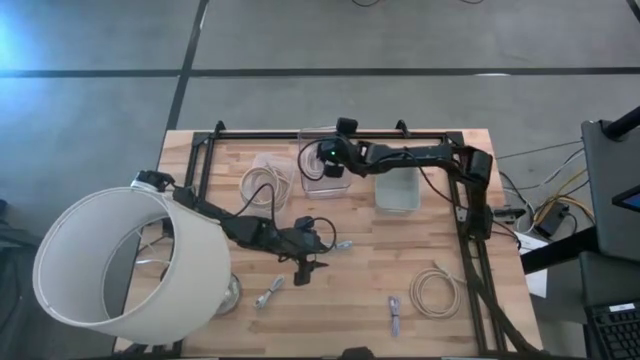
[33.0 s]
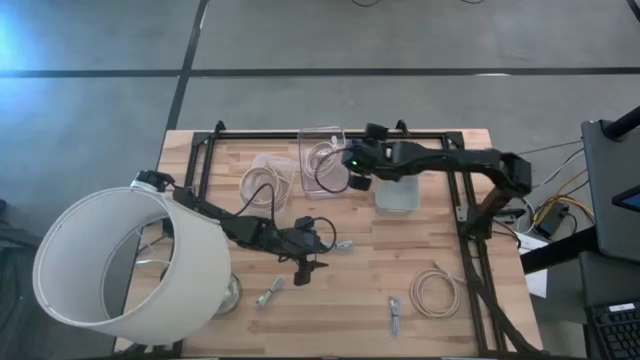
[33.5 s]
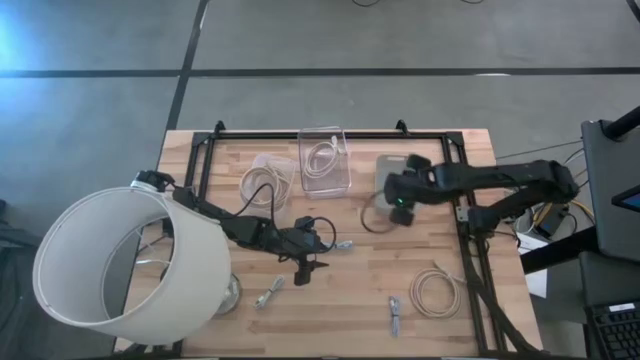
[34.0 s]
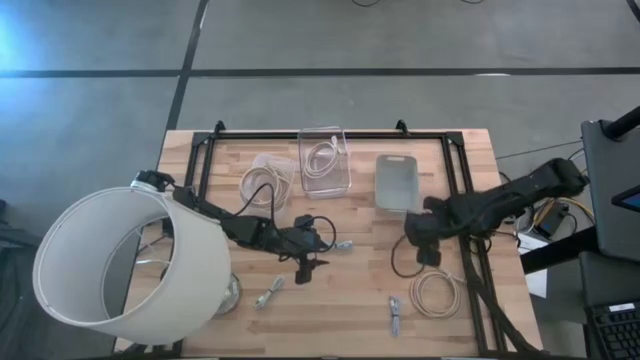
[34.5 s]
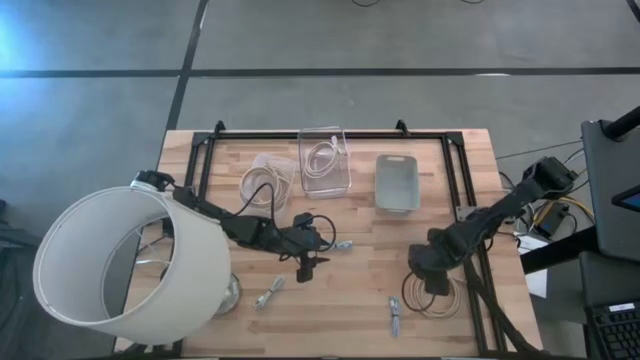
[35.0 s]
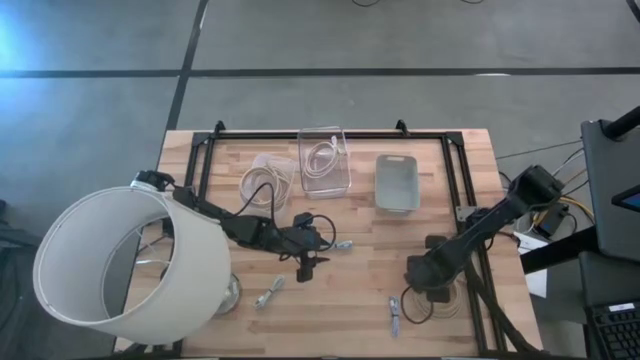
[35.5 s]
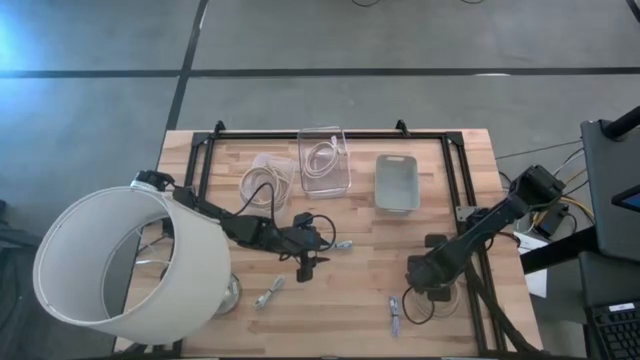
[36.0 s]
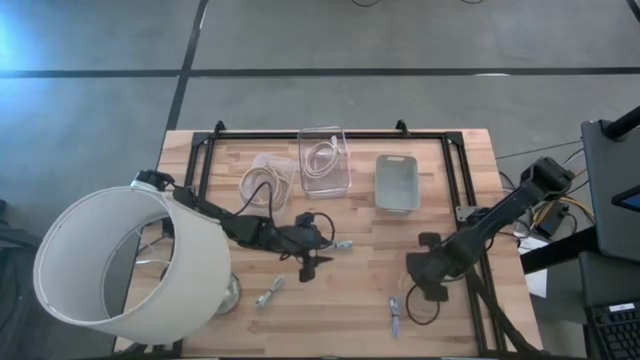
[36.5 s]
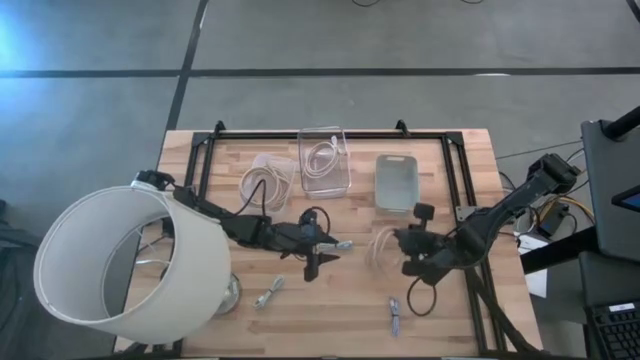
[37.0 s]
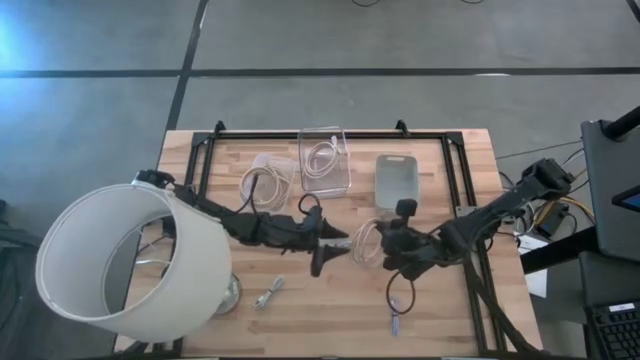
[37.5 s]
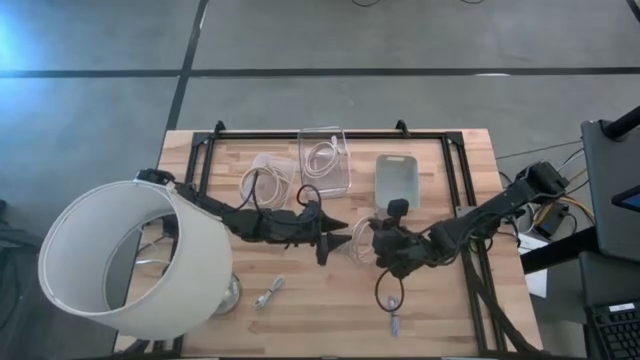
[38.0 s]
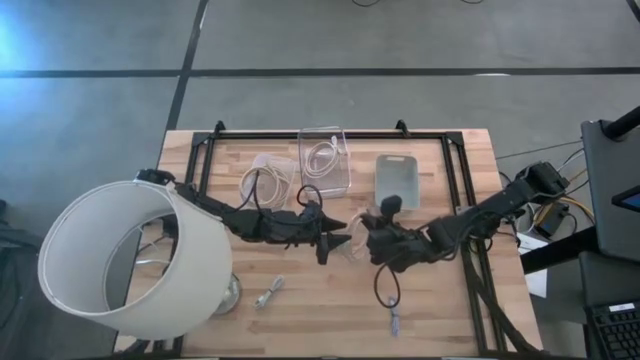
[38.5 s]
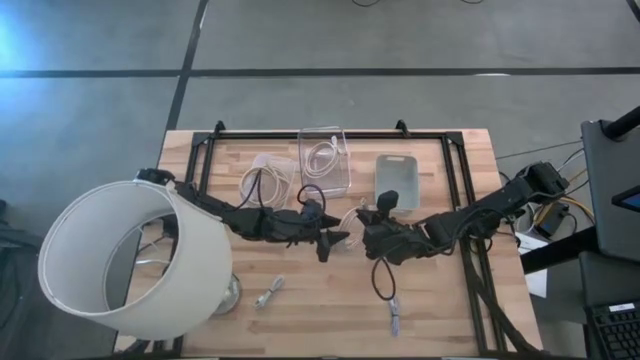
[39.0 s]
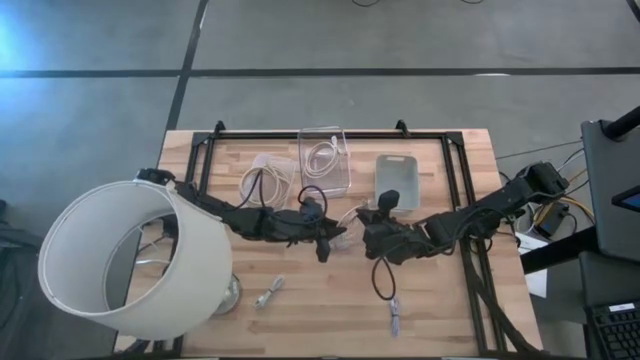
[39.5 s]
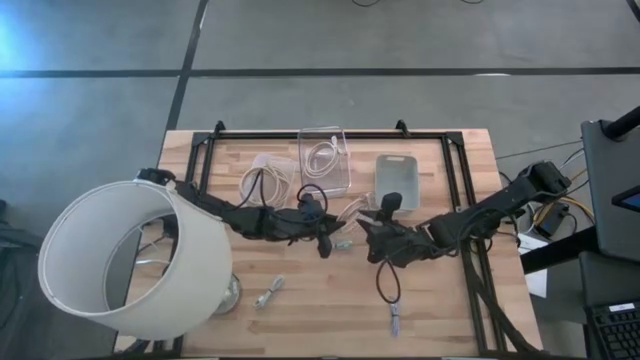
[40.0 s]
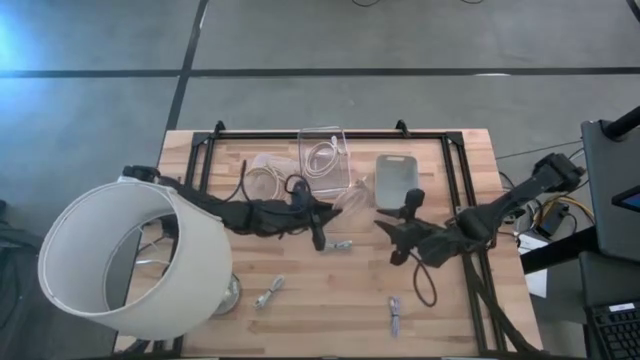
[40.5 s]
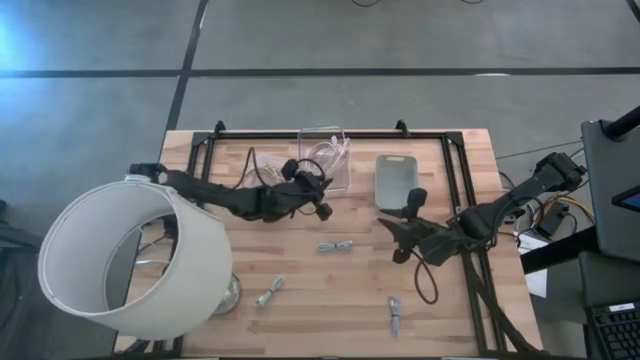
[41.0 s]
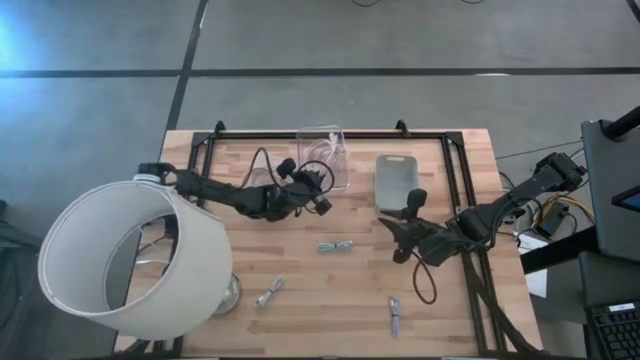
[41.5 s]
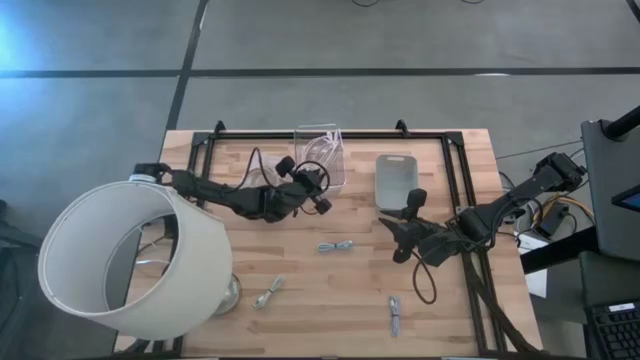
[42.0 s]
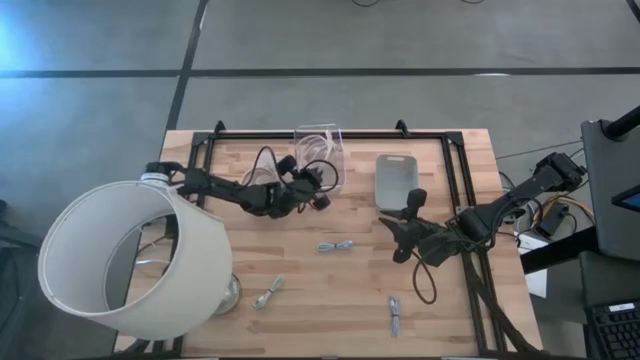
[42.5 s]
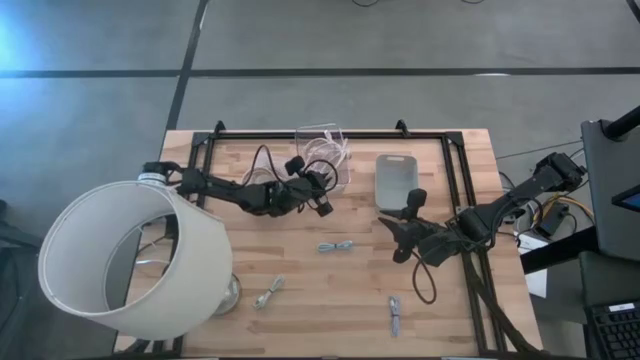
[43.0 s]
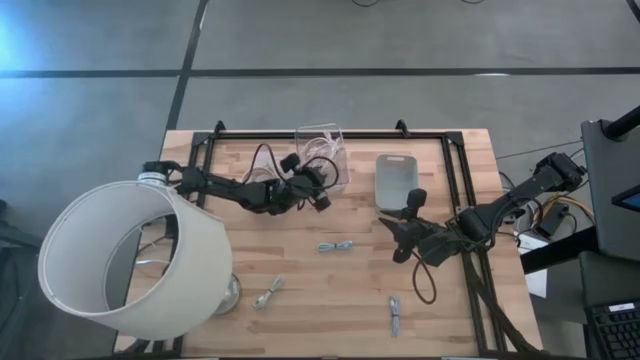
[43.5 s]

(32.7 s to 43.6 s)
Task: Pick & Place USB Port
Put the brown USB cable into the transparent bin

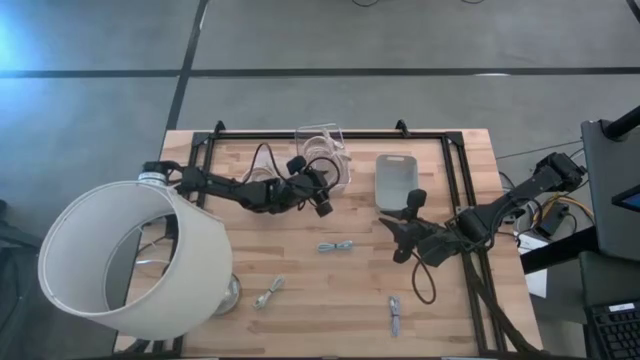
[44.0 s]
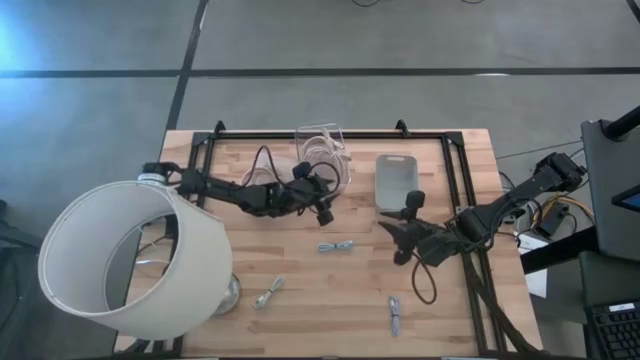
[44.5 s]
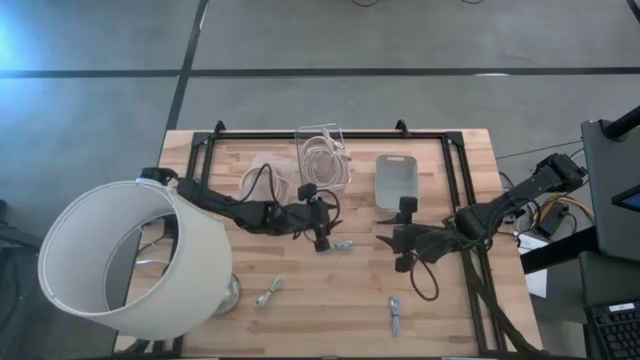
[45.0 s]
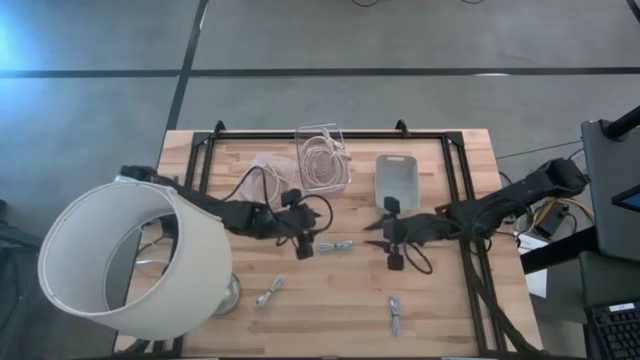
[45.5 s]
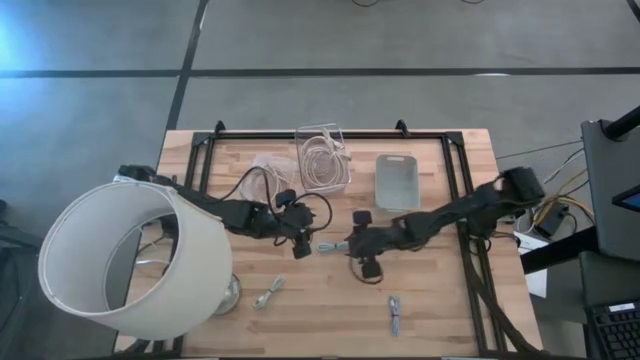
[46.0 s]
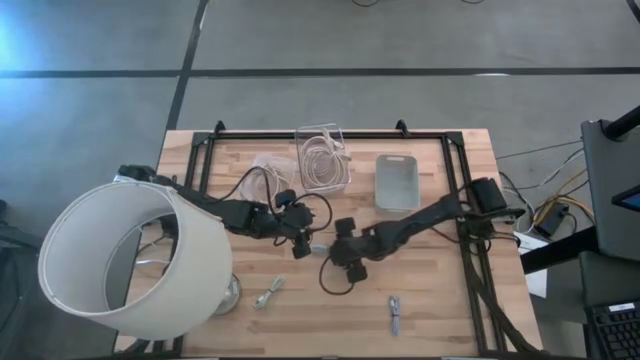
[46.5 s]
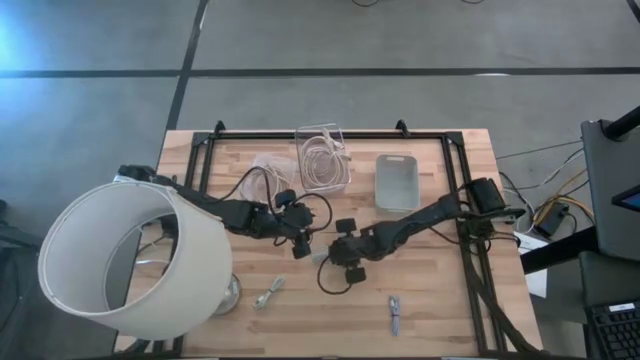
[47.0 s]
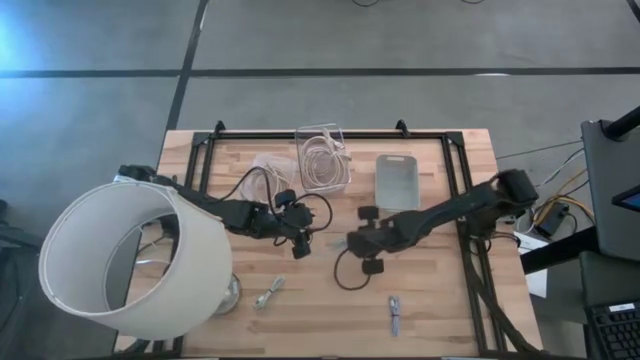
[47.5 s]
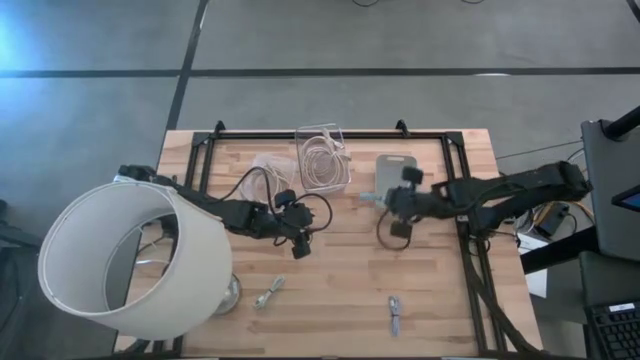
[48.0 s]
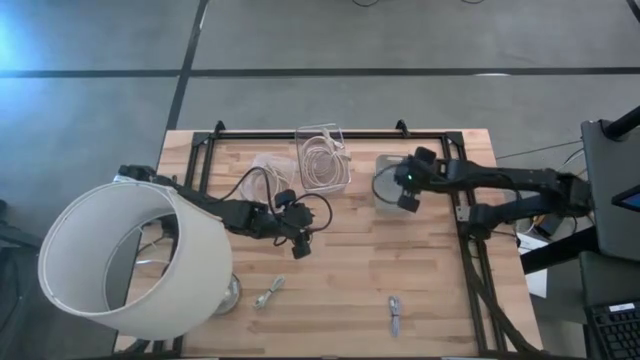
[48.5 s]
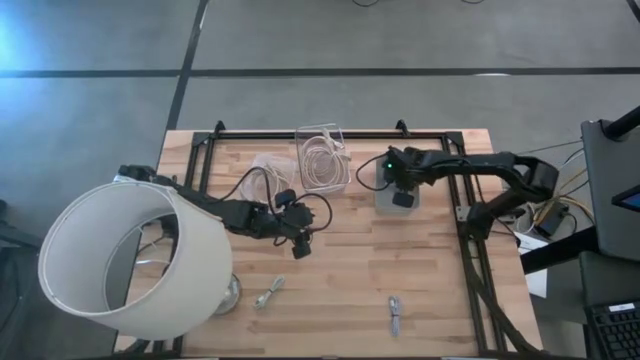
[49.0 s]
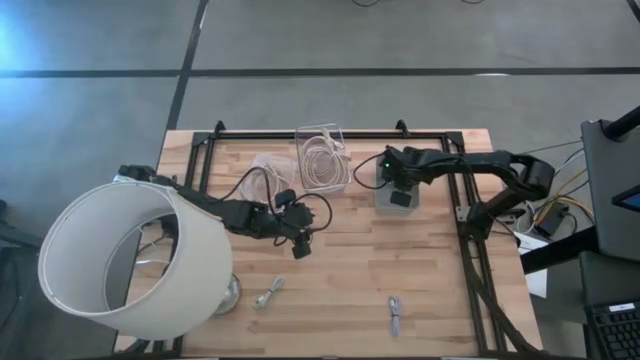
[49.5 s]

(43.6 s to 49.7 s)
Put the blue USB cable into the gray bin

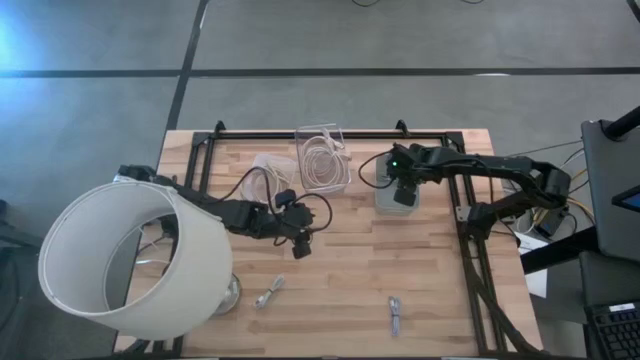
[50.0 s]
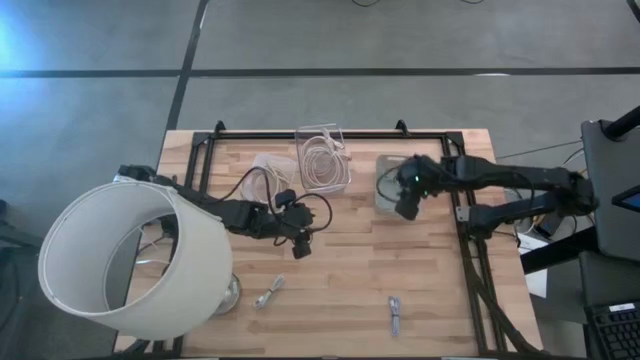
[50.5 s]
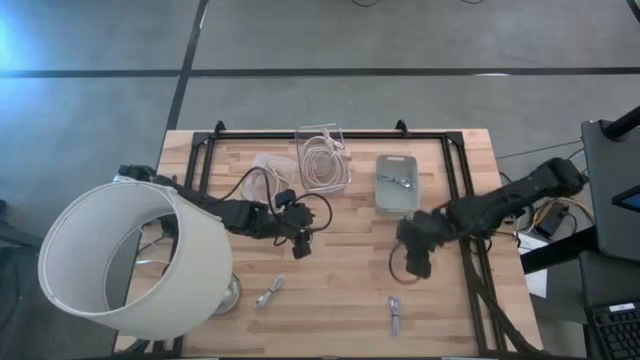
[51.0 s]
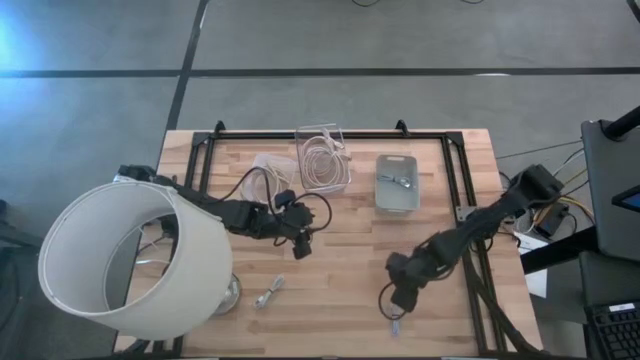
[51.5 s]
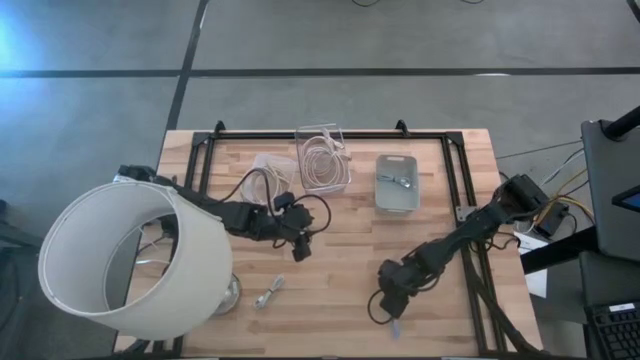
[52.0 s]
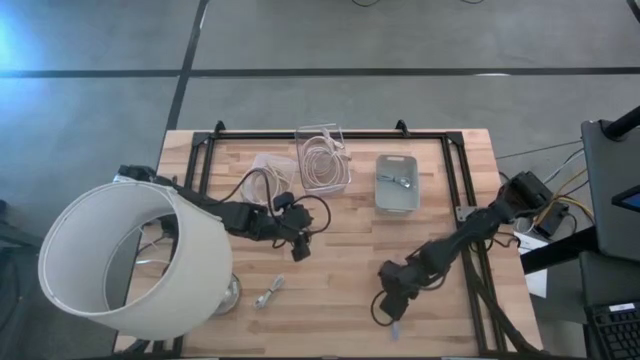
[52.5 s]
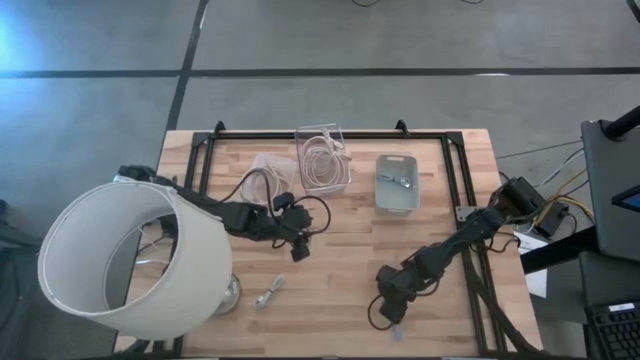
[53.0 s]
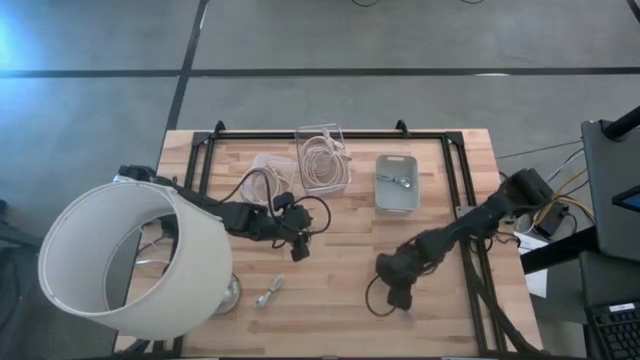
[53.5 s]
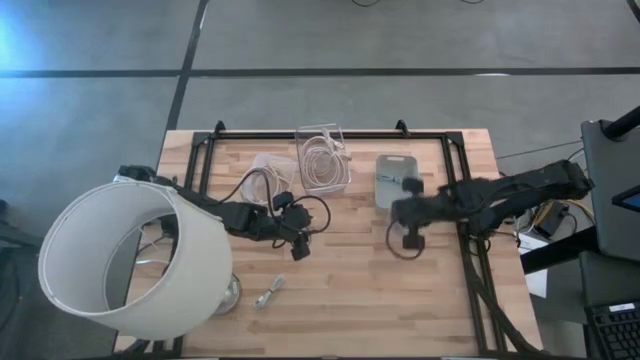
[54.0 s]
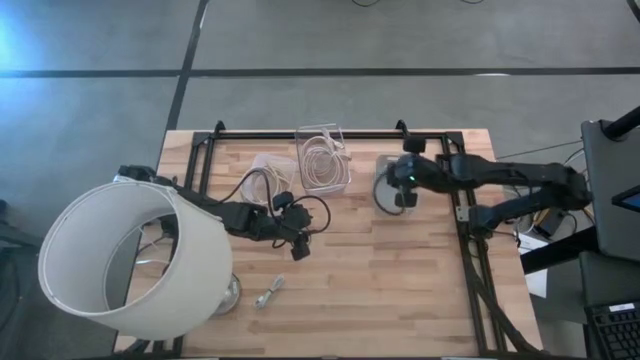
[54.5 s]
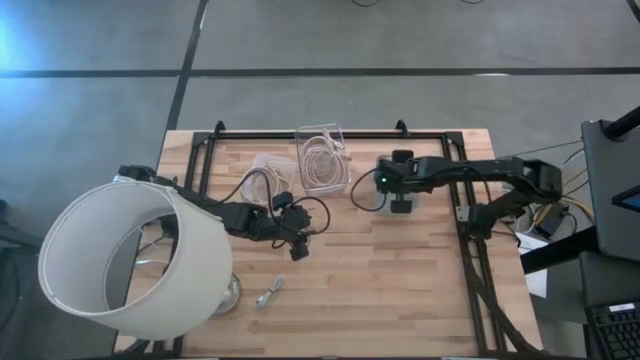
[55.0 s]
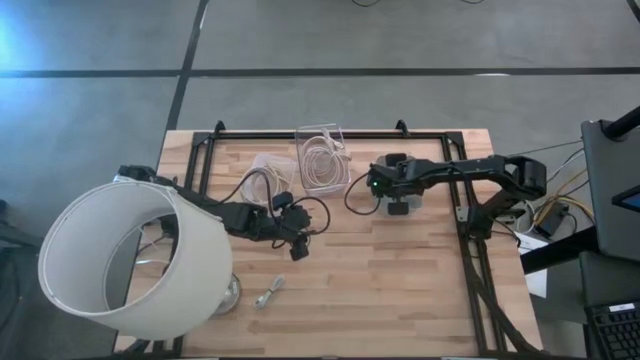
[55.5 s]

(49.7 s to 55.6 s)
Put the purple USB cable into the gray bin
